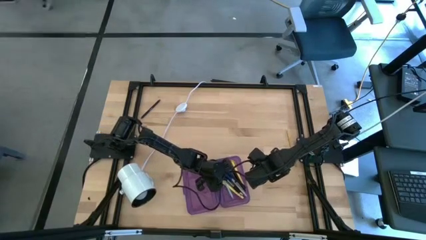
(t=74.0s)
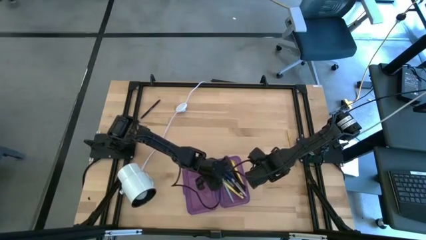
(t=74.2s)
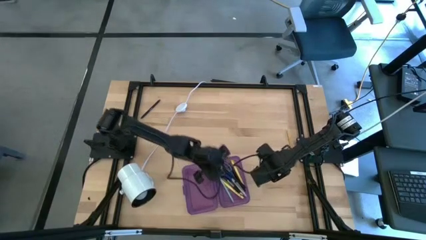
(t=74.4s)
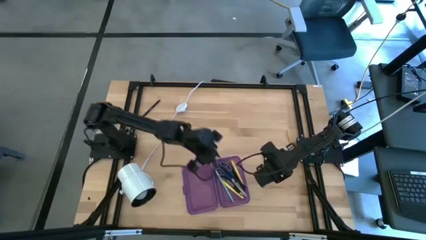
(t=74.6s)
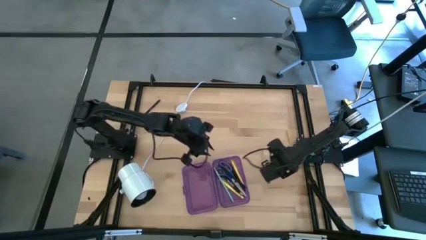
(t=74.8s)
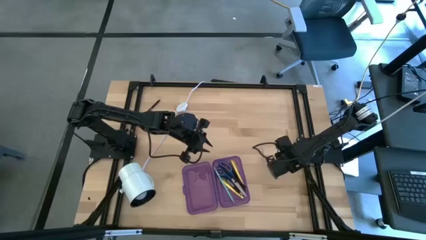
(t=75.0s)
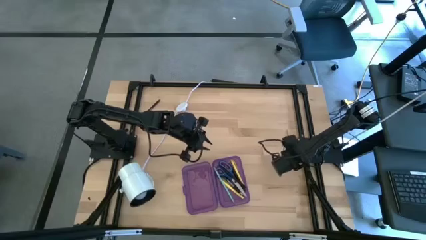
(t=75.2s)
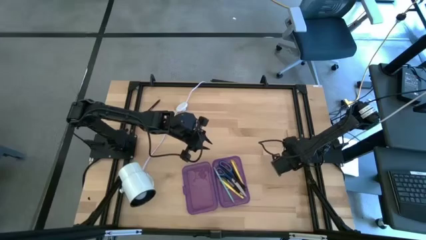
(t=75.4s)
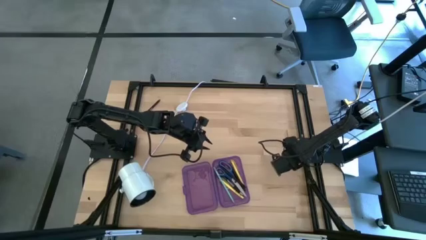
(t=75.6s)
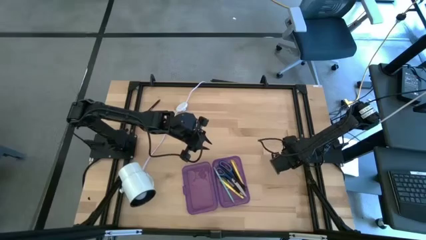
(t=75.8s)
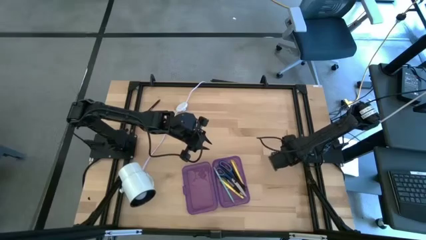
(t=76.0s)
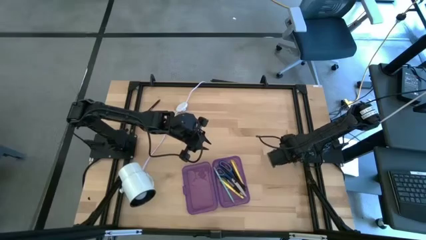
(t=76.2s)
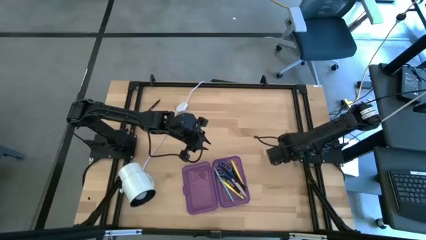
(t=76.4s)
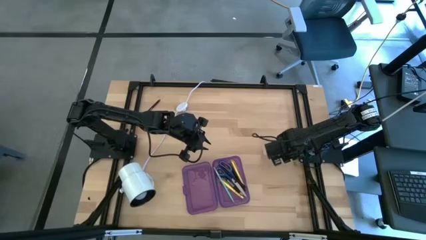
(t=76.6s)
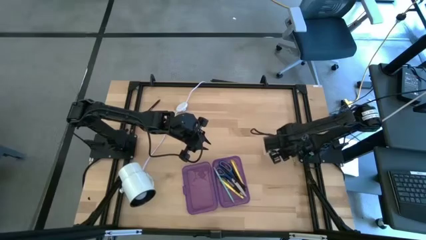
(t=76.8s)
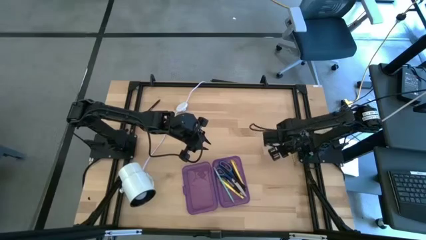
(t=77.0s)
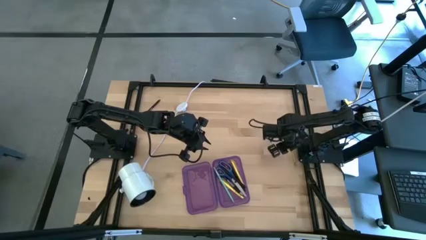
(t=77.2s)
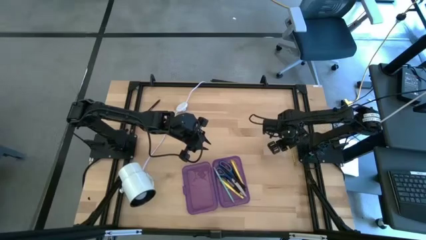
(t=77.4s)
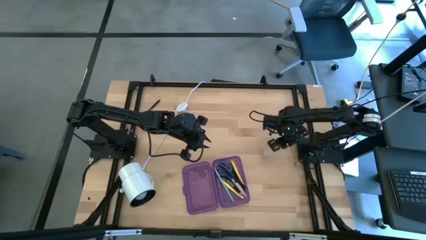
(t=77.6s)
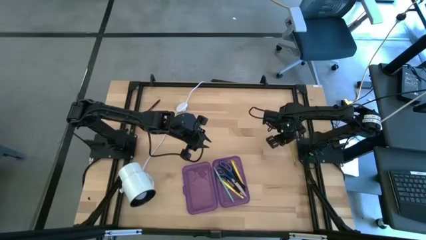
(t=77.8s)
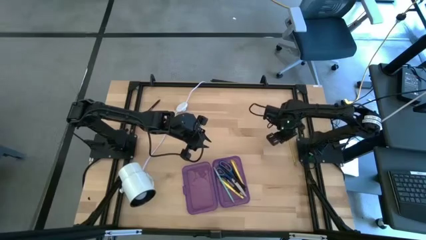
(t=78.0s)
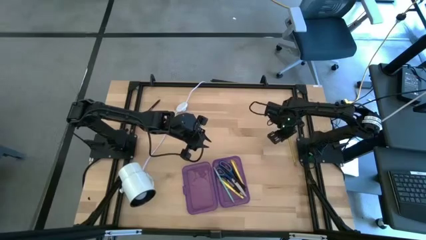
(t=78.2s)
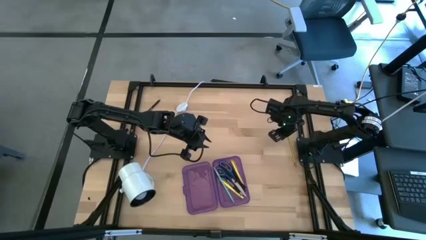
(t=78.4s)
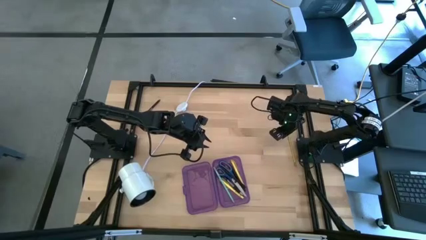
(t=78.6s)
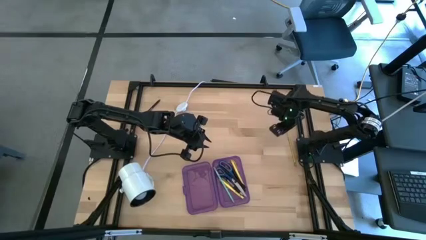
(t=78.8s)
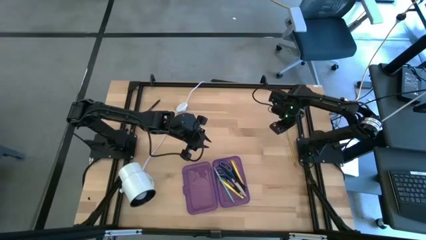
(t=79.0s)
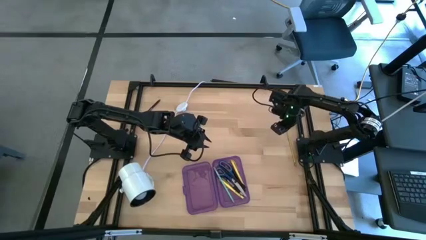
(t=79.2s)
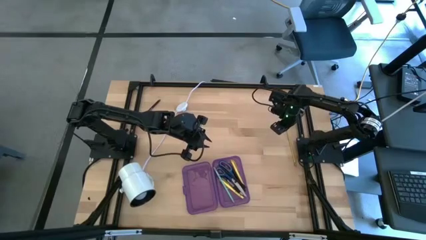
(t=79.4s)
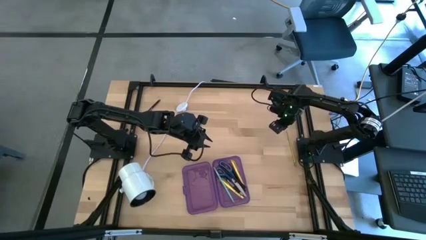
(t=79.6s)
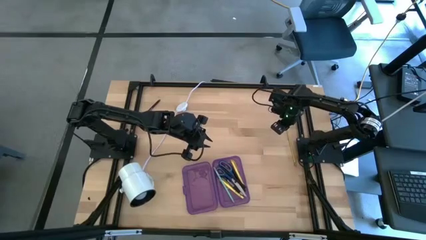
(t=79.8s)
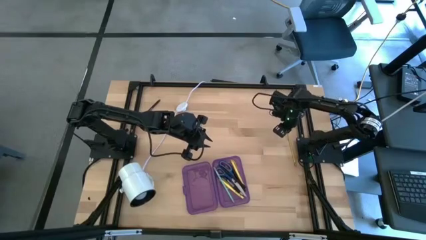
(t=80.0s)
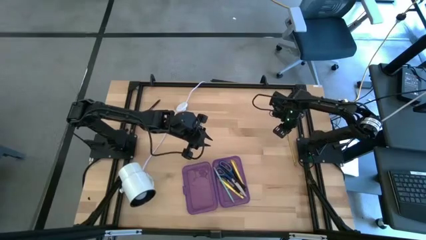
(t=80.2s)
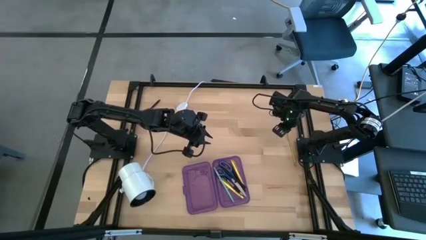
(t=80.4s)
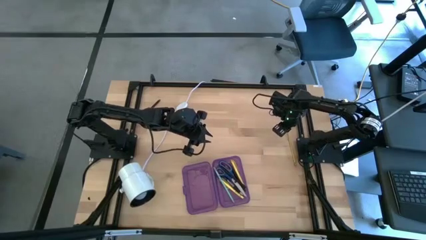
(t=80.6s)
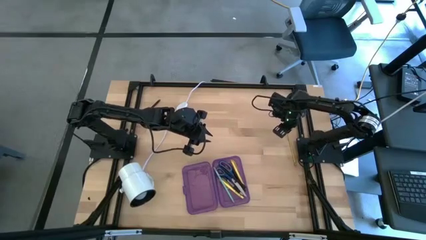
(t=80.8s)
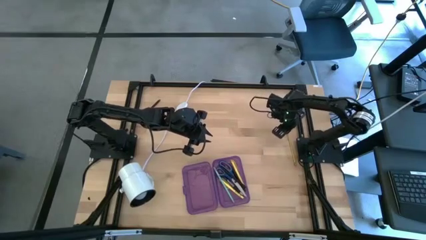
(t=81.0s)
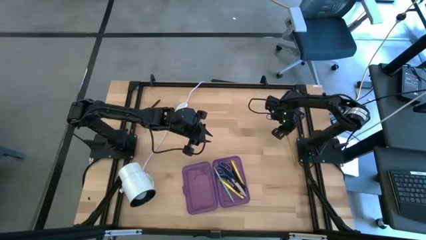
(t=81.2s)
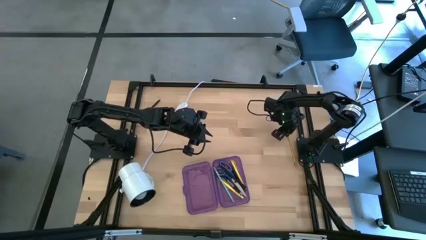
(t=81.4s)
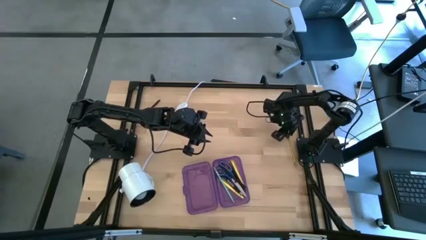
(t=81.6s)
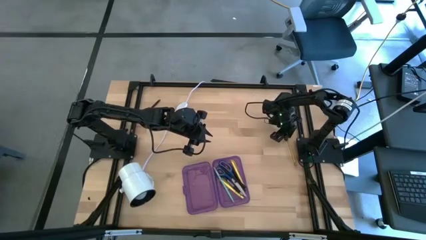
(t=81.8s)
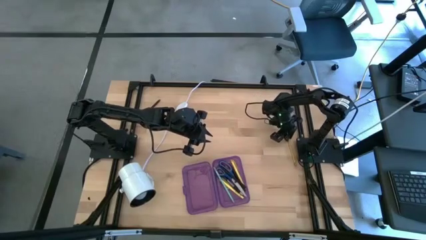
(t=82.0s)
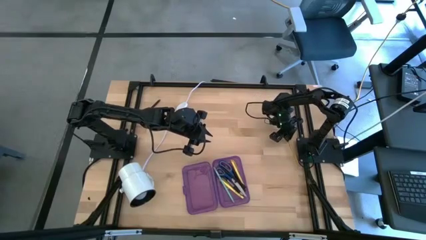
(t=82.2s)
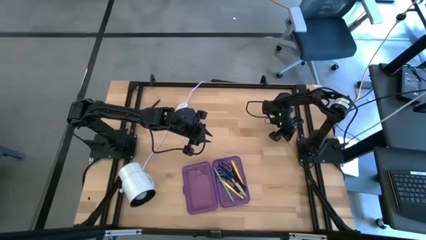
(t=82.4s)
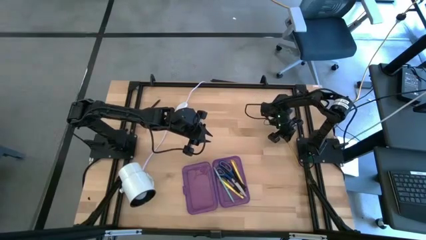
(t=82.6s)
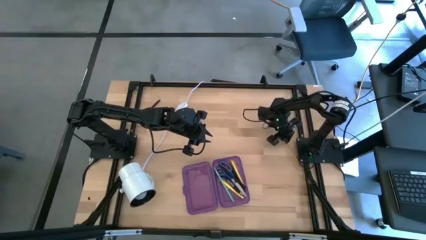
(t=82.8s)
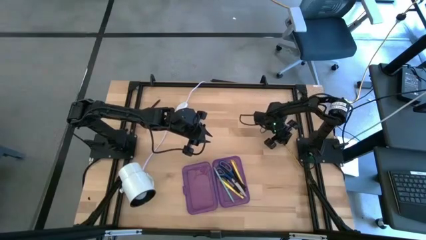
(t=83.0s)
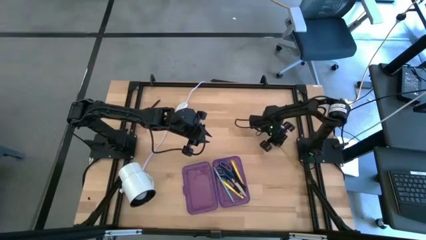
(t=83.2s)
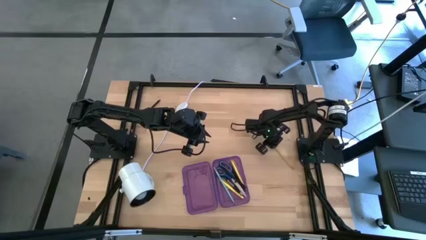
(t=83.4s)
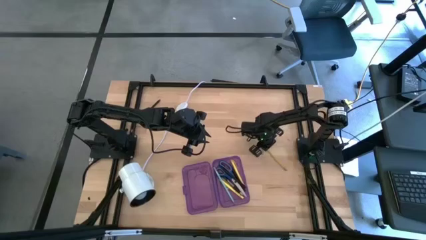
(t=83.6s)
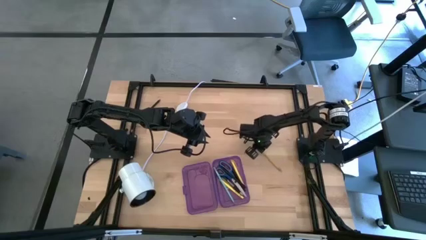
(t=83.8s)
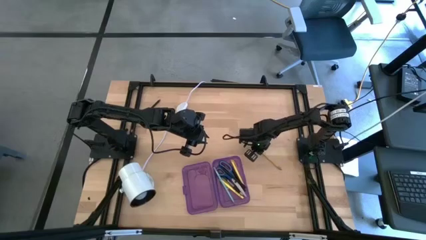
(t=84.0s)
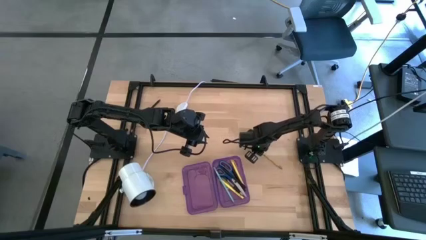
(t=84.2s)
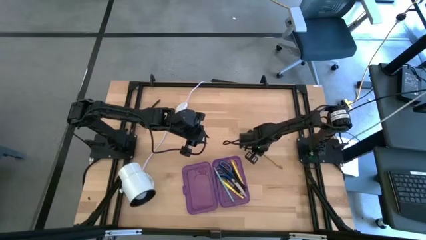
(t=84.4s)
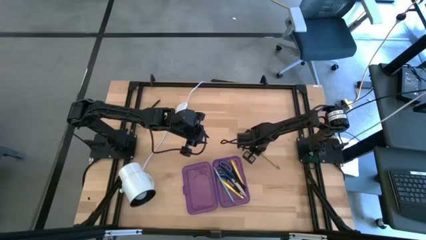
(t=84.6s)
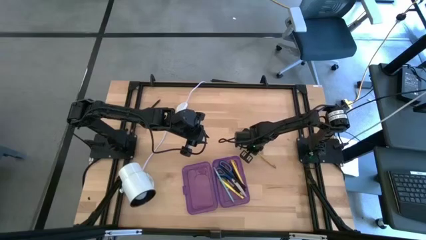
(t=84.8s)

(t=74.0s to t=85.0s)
Task: Pick & place school supplies into a supply box
Put the yellow pencil into the purple supply box

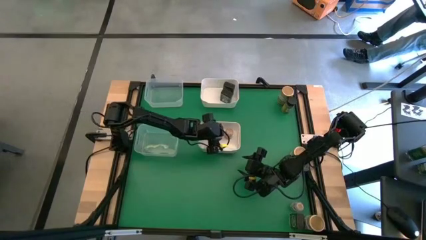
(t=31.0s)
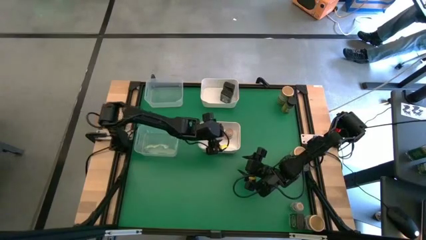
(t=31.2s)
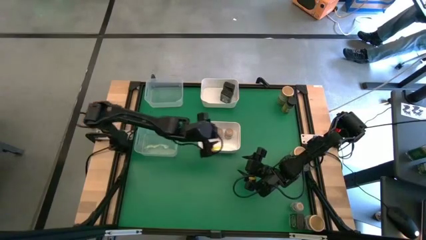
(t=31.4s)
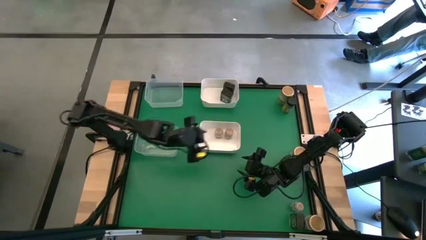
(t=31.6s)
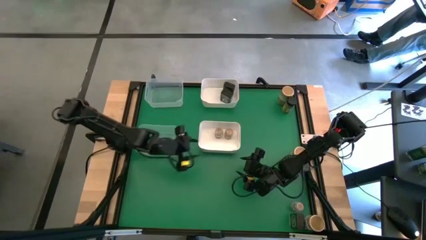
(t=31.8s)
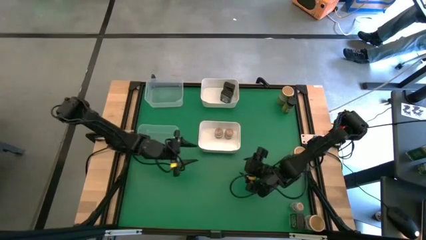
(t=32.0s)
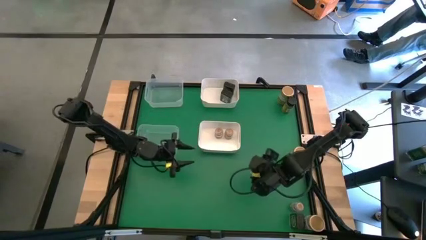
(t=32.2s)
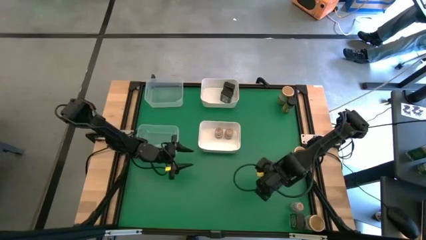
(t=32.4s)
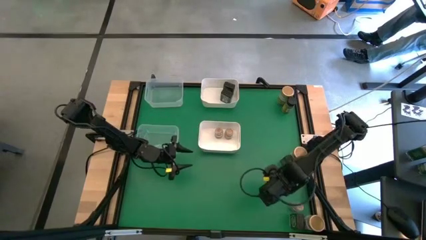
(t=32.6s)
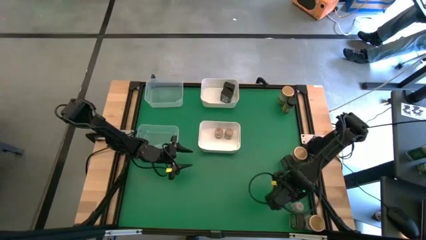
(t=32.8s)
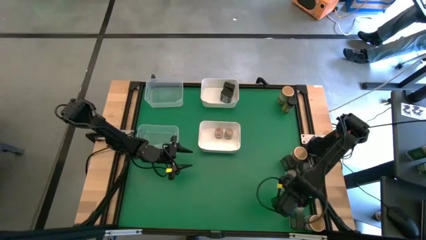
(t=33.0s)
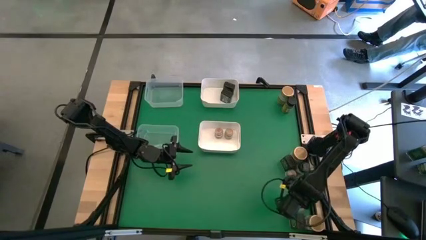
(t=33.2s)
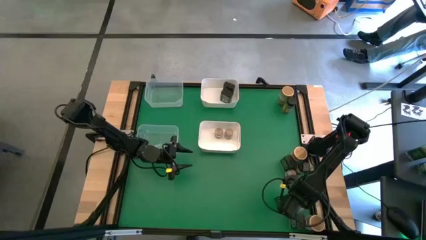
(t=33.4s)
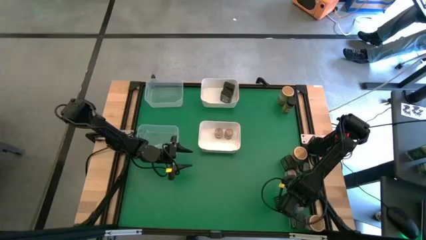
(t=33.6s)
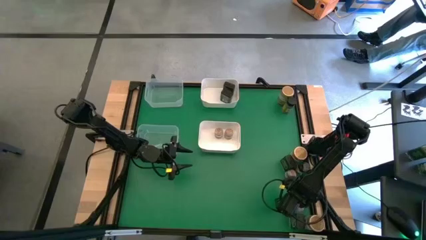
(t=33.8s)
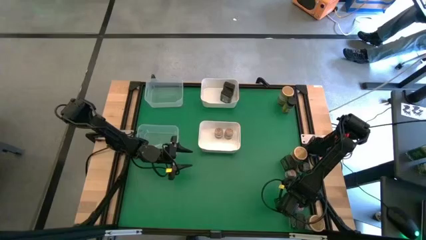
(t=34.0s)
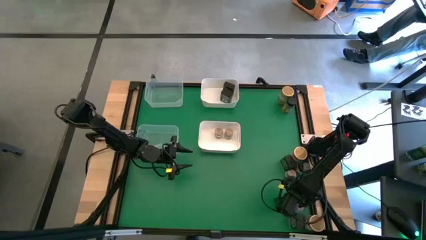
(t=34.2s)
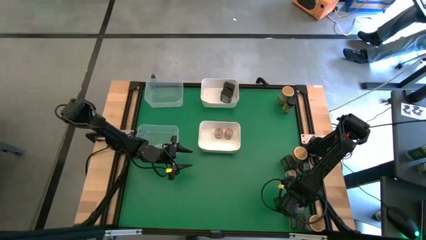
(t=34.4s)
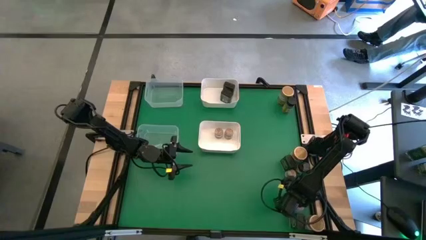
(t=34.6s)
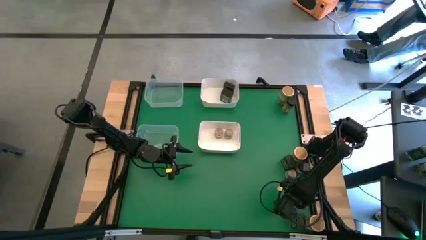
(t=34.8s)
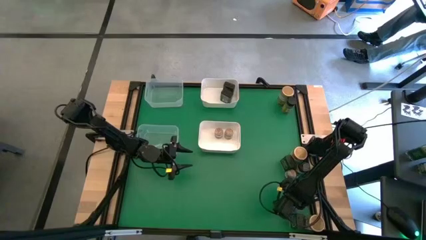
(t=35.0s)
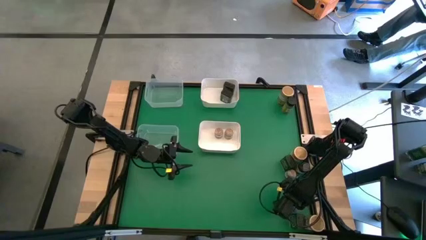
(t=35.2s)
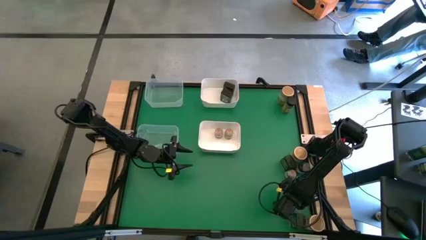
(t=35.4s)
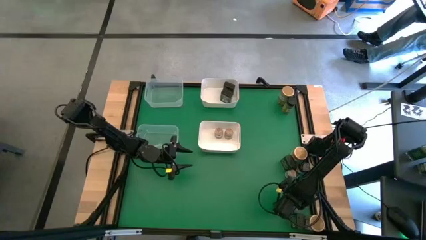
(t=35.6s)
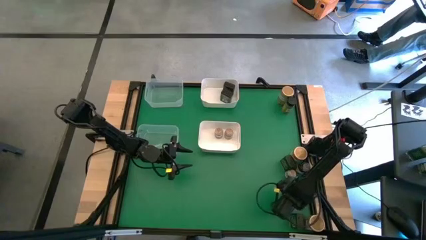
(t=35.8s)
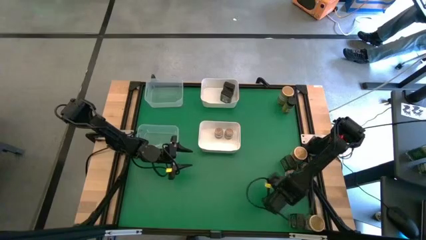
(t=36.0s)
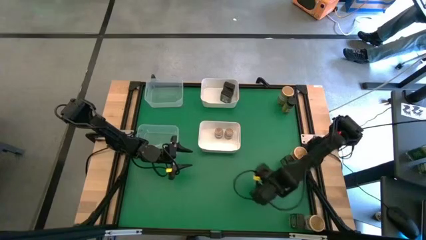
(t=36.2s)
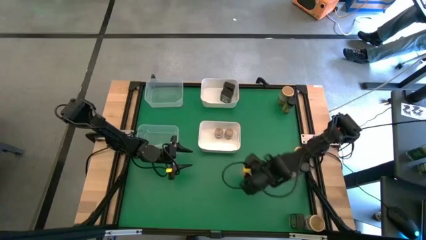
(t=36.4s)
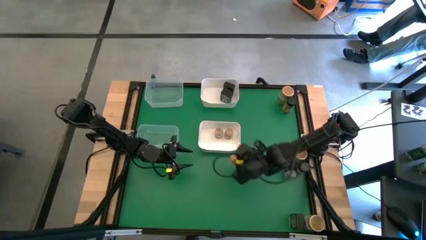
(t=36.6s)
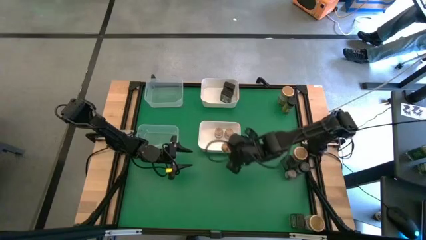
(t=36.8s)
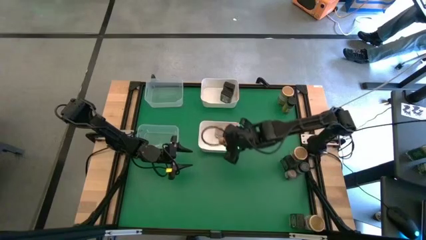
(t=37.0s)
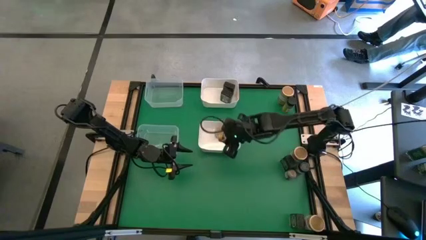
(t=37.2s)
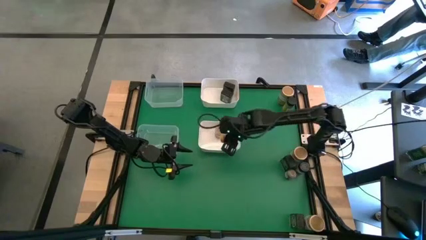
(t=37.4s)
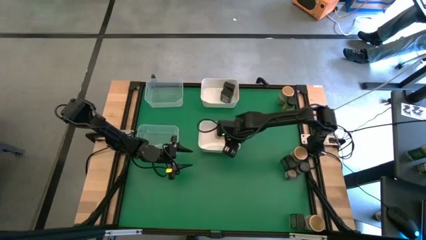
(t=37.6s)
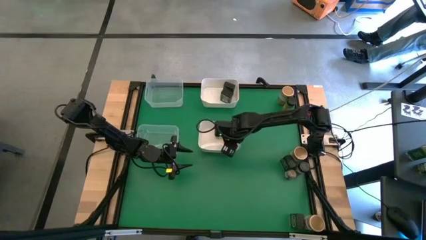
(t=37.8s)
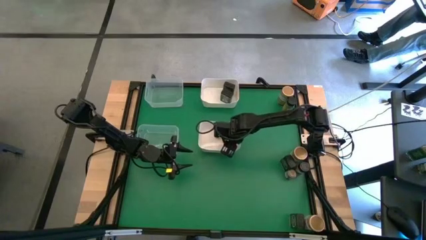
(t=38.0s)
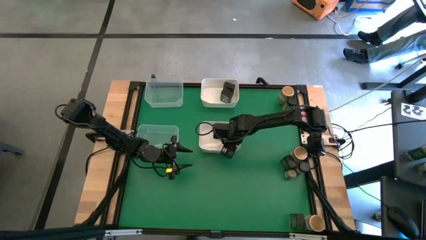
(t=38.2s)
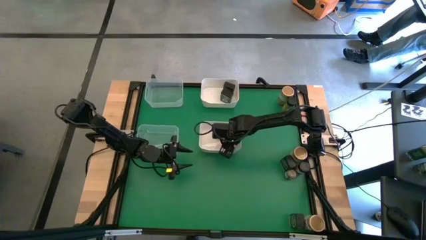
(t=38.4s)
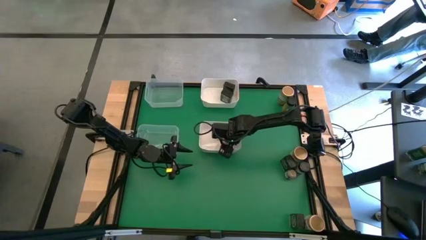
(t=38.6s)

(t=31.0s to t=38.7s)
Task: Sort spices by type
Put the bottom brown seasoning bottle into the bottom white bin
